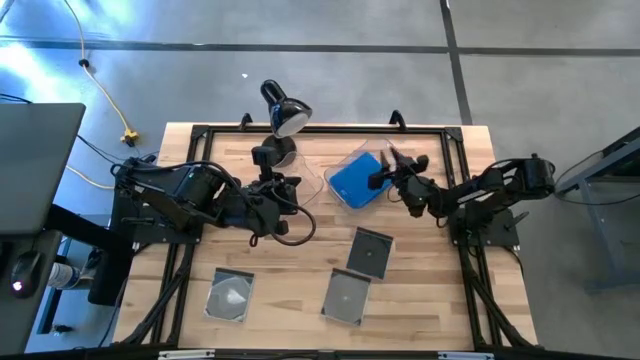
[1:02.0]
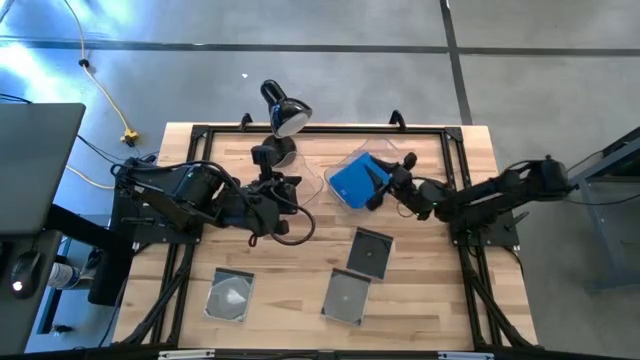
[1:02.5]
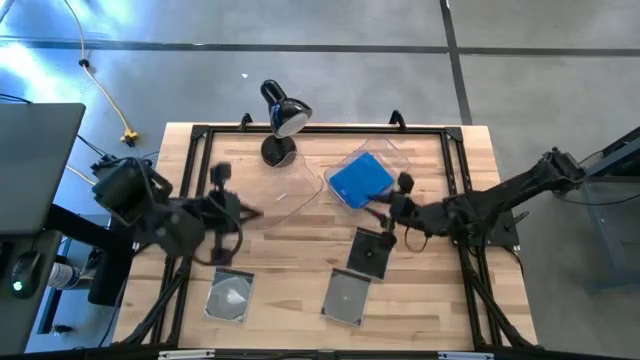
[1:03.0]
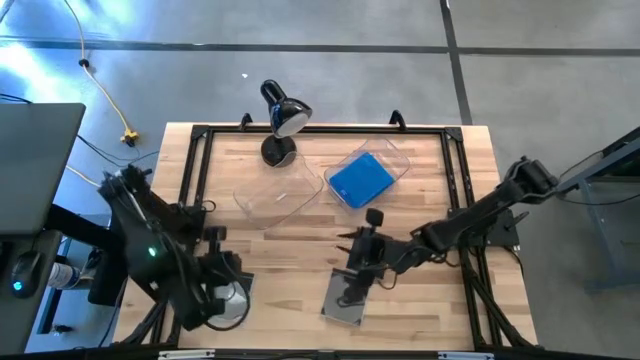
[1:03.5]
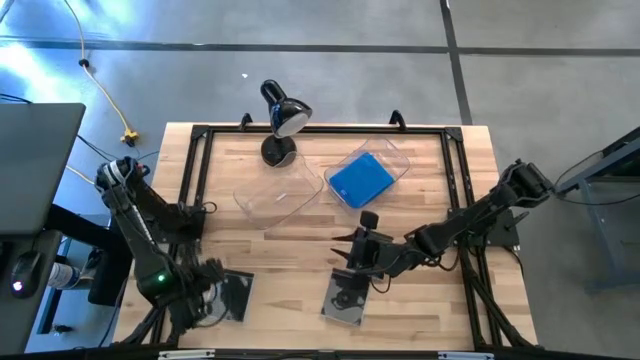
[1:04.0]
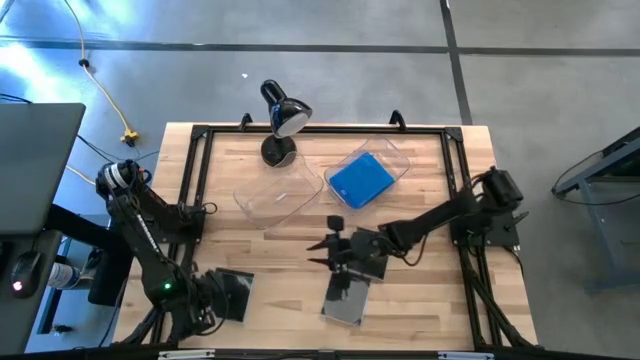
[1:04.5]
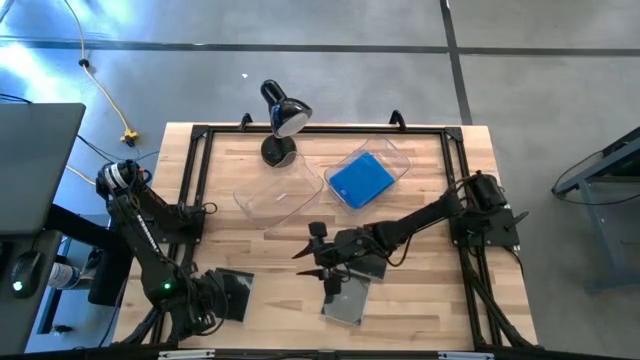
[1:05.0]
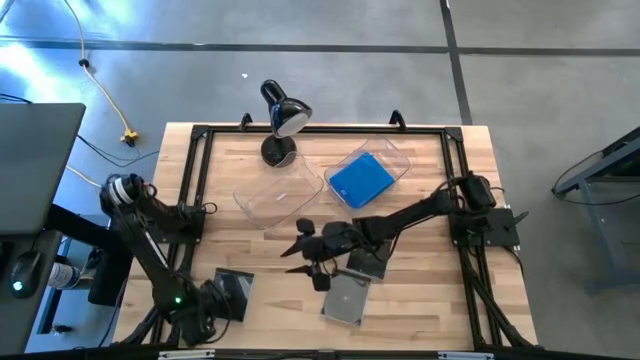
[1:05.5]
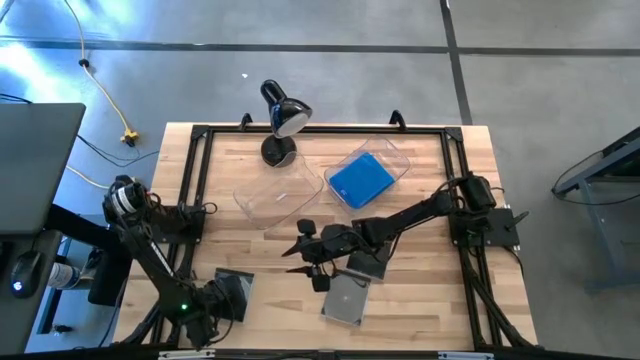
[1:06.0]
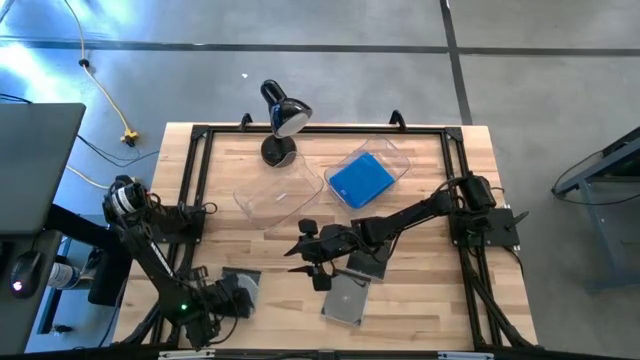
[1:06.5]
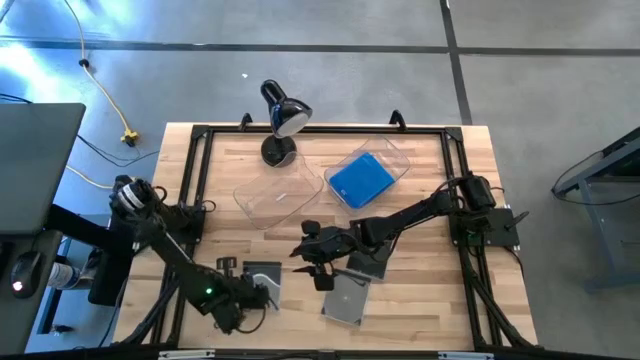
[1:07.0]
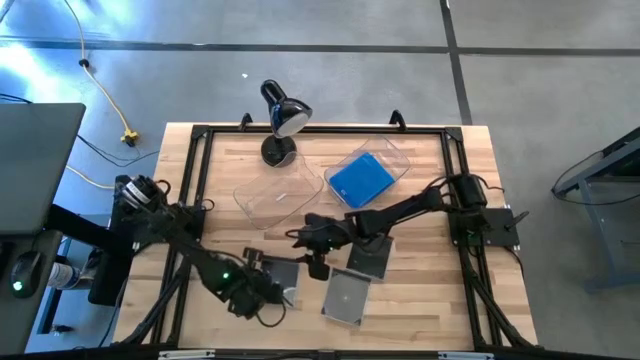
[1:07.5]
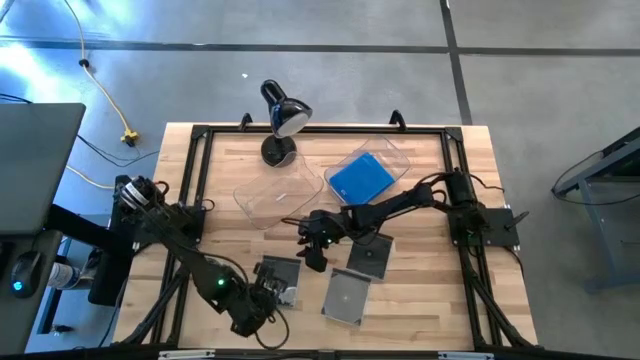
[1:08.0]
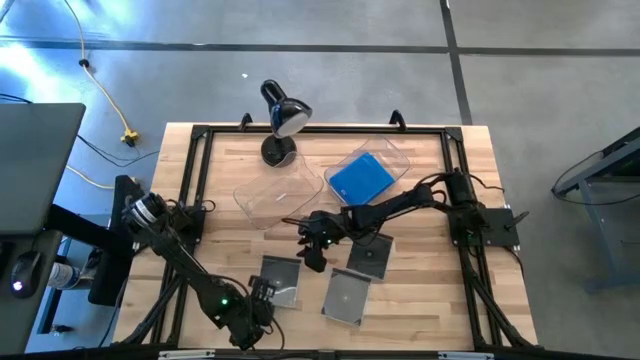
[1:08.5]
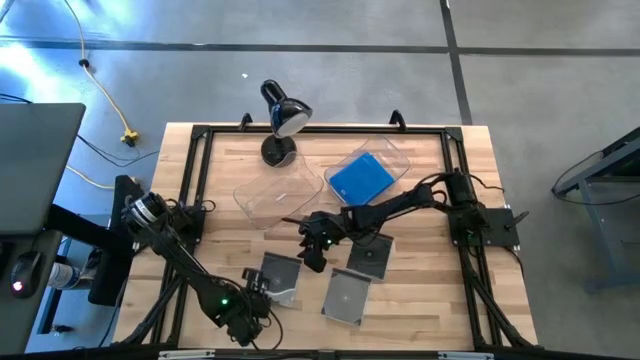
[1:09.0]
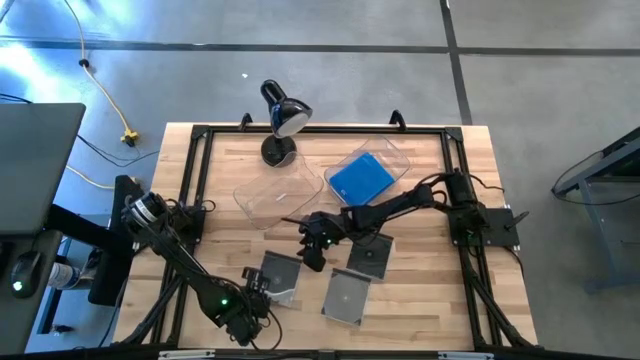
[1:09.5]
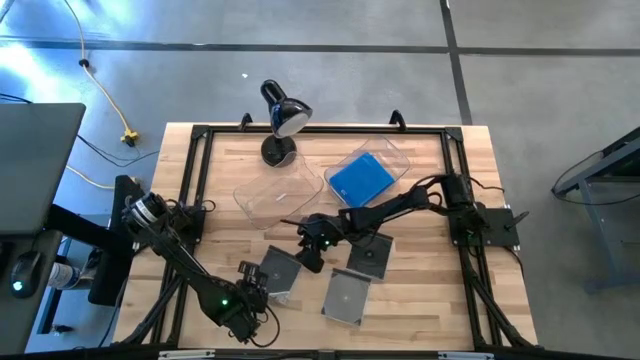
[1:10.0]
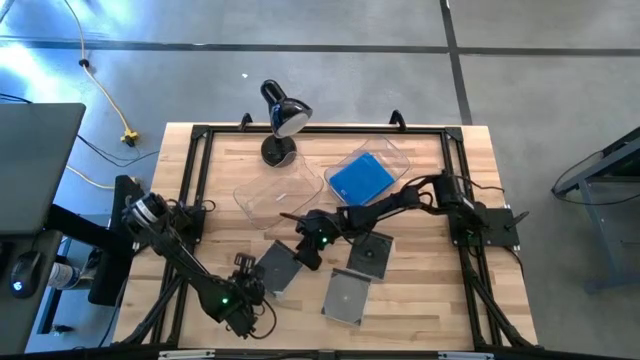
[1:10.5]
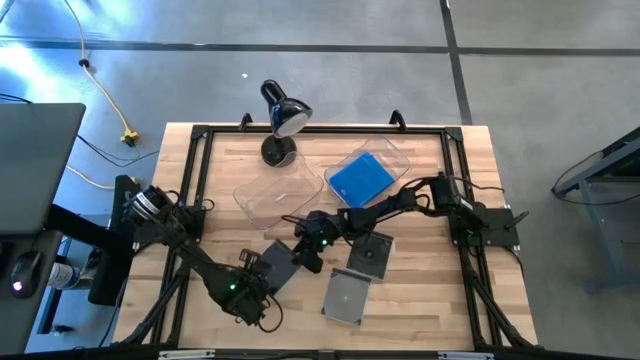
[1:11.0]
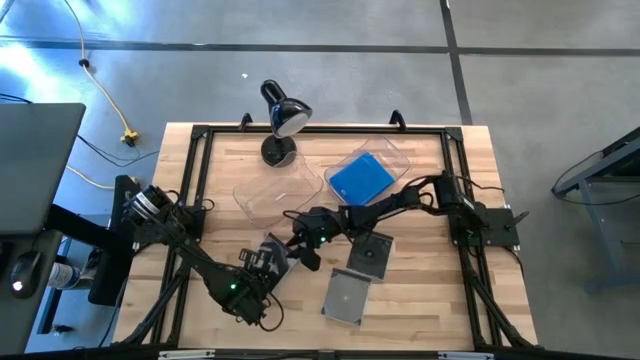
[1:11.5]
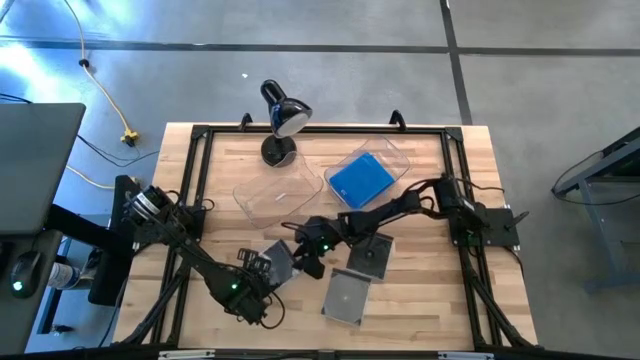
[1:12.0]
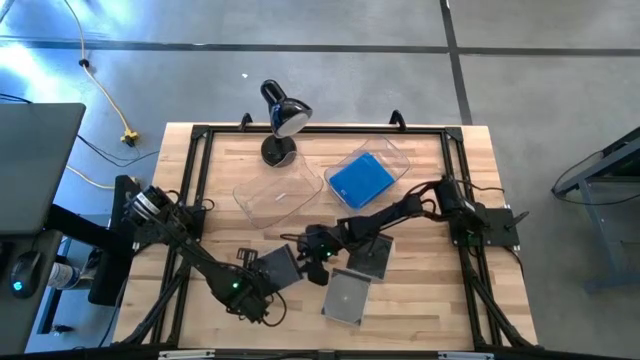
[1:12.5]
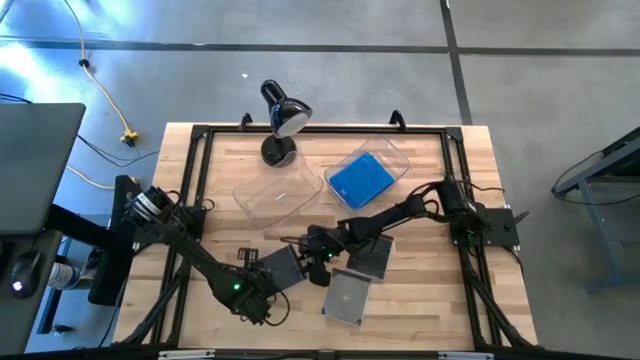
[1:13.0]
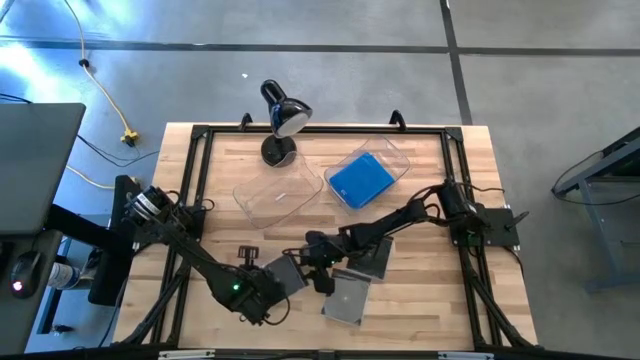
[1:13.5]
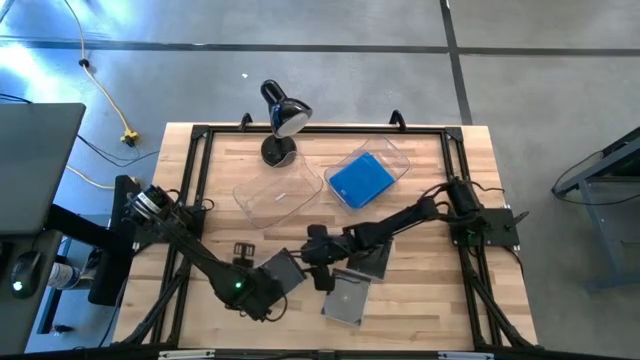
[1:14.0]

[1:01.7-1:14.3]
Task: Pick & place jewel cases by type
Put the bottom left black CD case into the left transparent bin

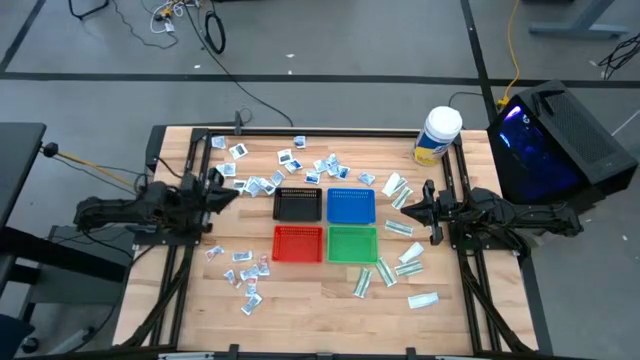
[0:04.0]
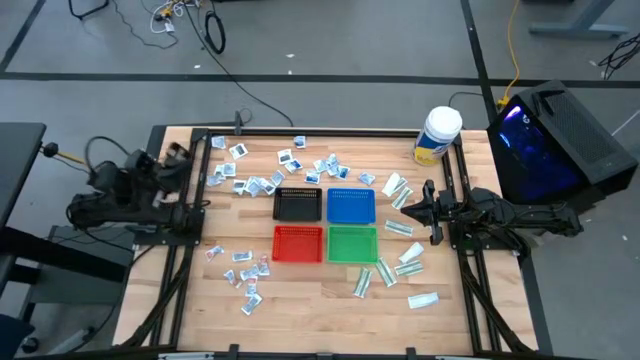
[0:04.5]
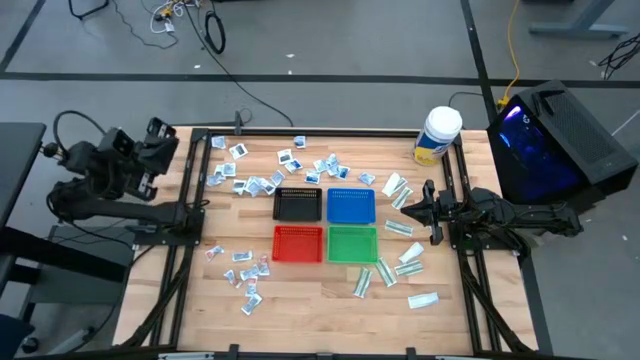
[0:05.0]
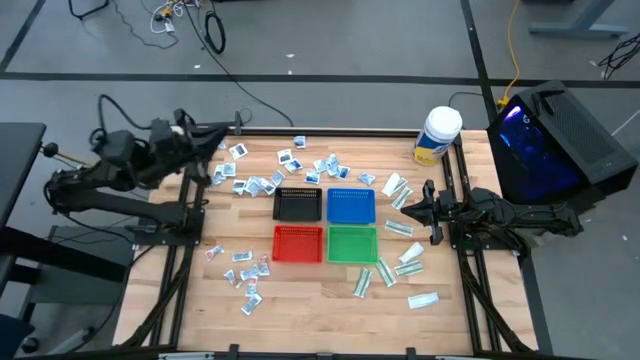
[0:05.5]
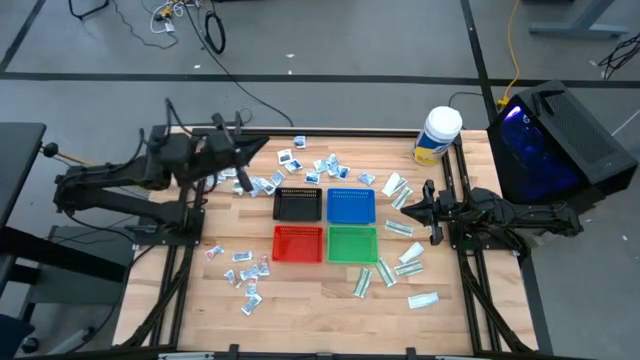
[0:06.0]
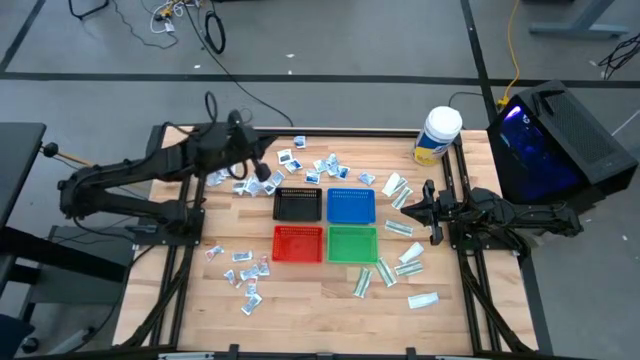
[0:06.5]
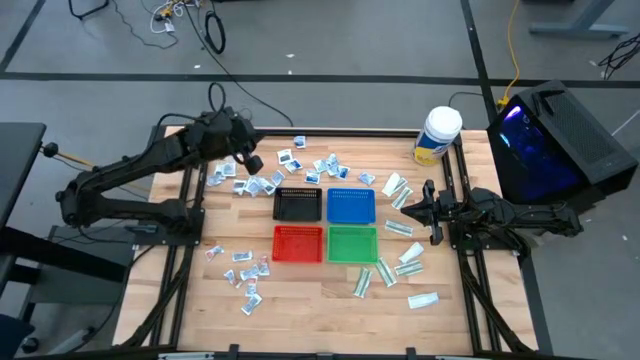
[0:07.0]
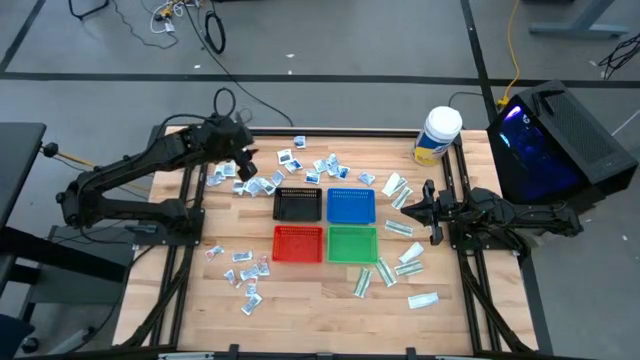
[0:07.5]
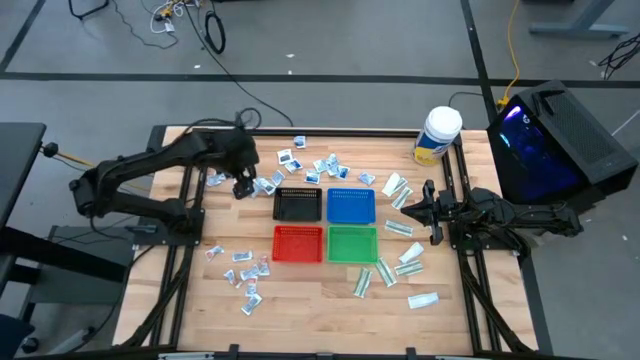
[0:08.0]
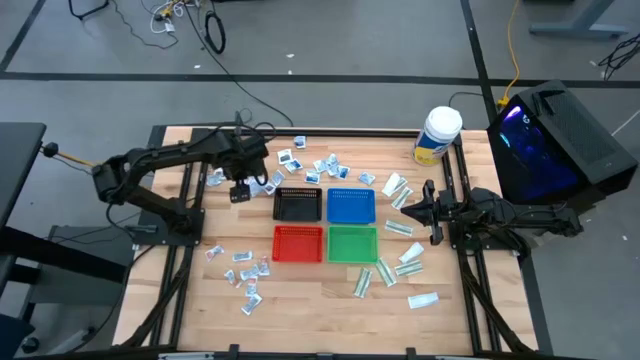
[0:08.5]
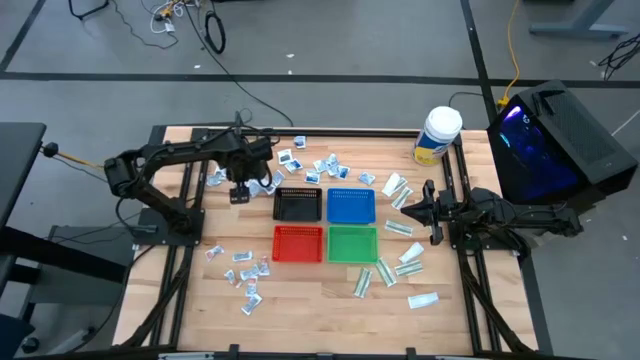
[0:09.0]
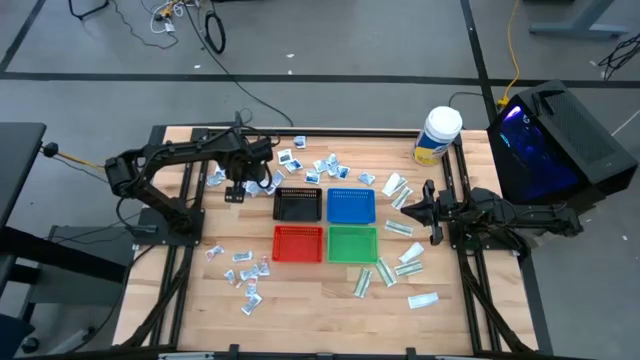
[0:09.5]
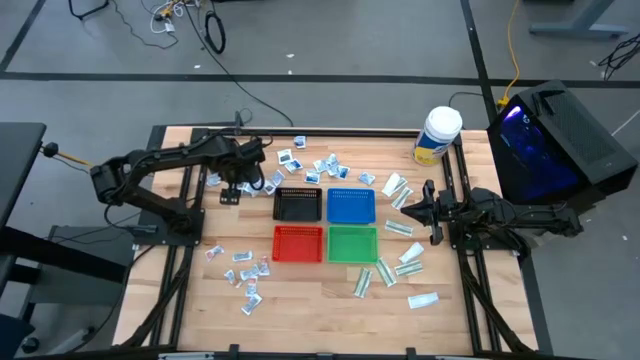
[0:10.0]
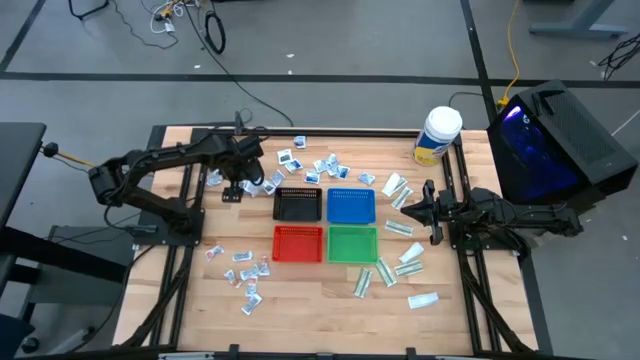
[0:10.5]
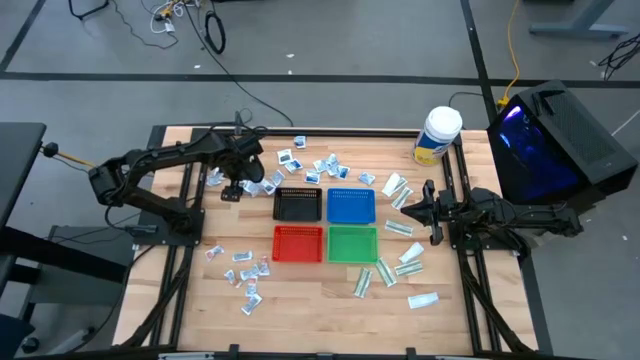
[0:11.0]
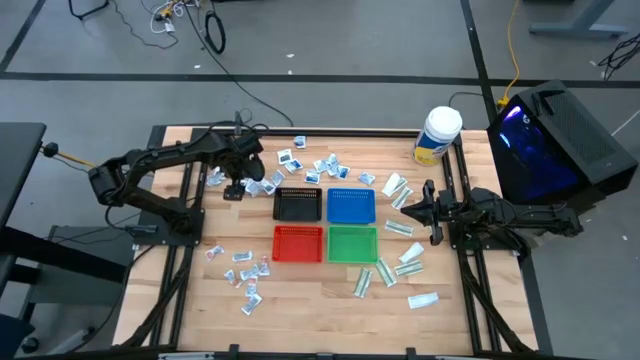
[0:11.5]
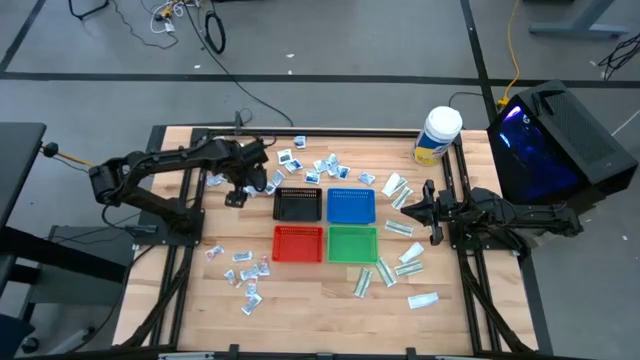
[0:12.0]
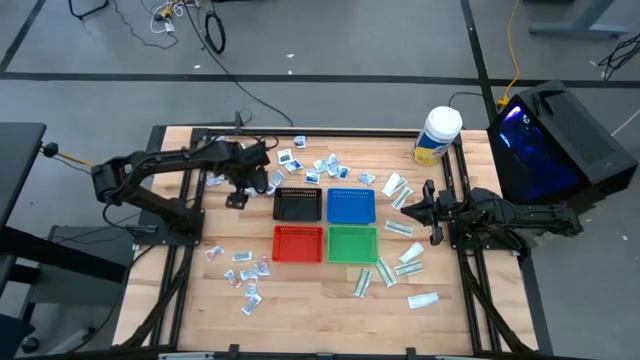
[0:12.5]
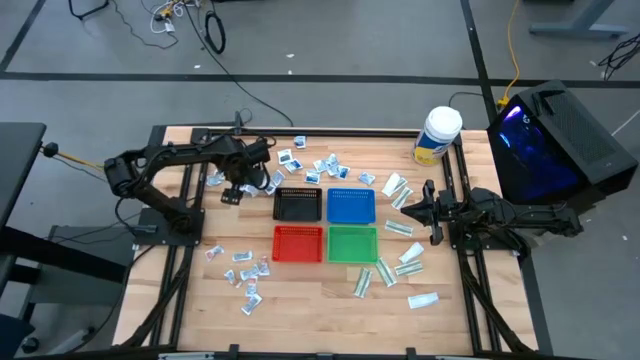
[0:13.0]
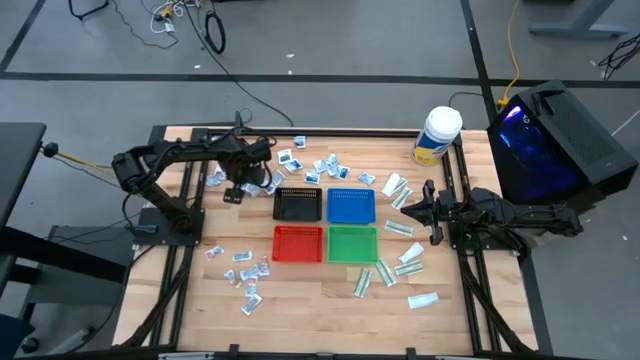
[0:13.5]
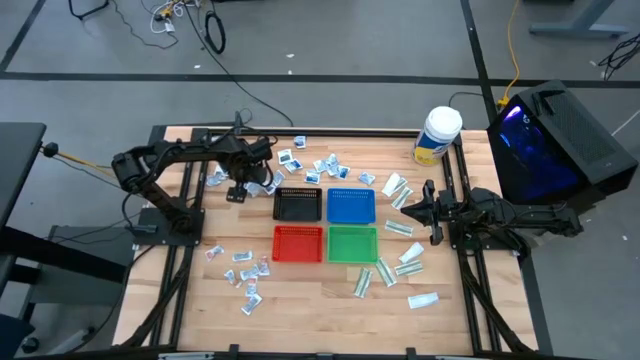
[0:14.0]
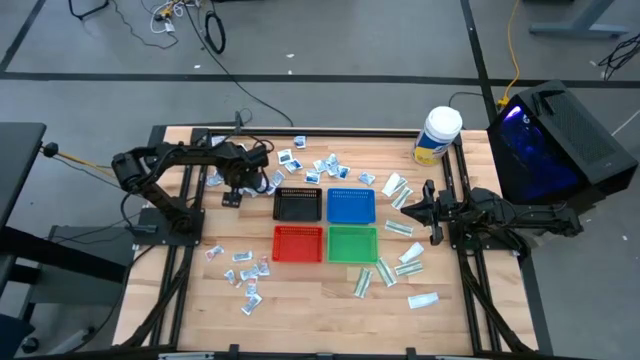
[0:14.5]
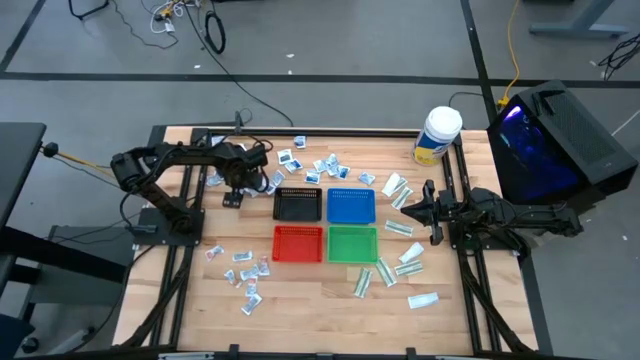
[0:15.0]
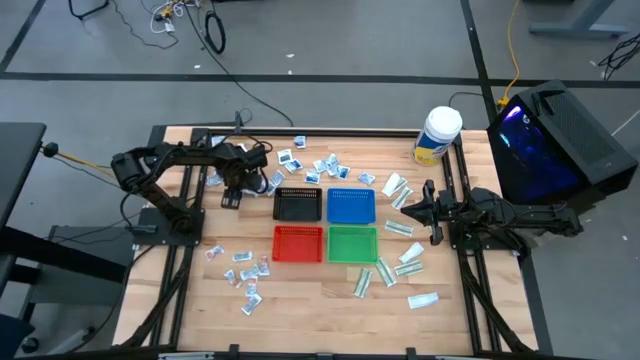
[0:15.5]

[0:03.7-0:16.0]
Task: Pick & Place First Aid Supplies
Put the gray towelette pack into the black bin
